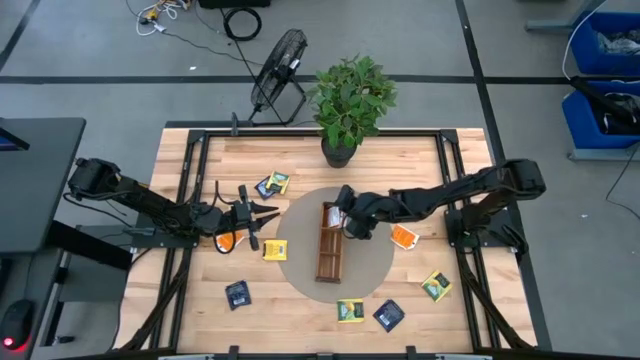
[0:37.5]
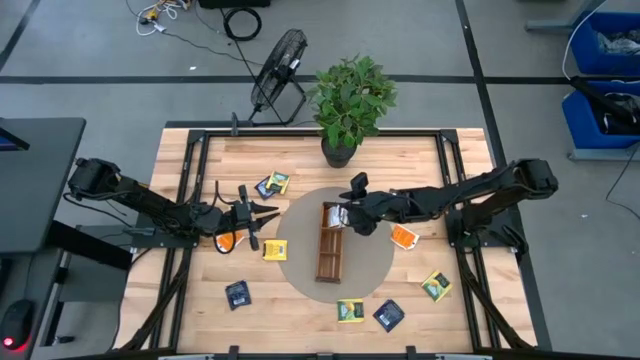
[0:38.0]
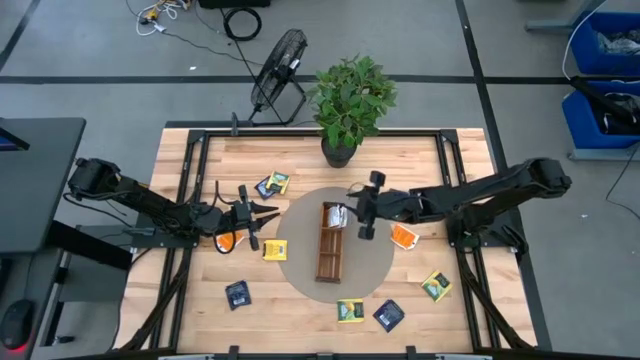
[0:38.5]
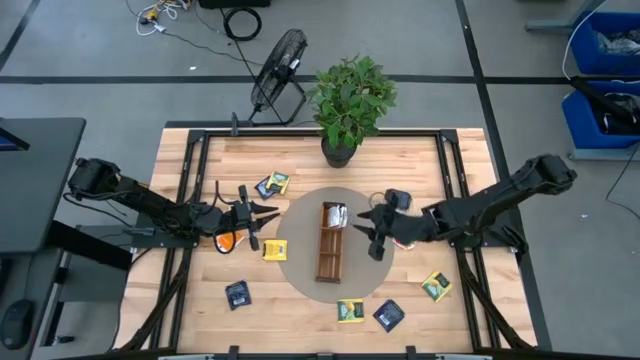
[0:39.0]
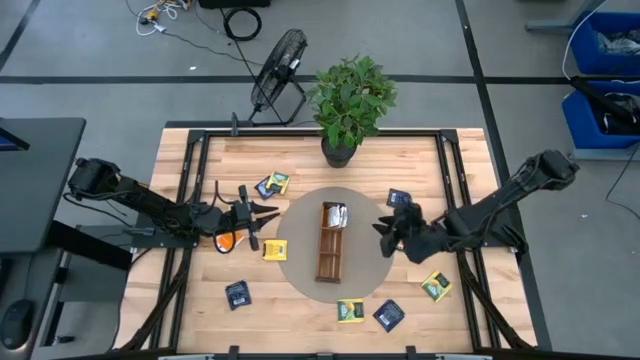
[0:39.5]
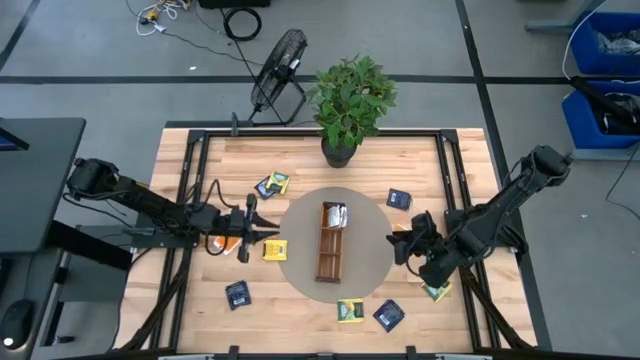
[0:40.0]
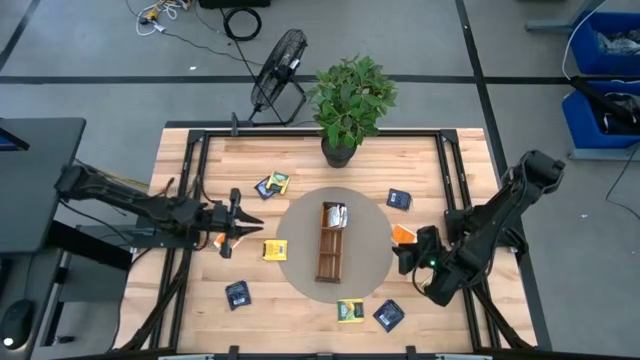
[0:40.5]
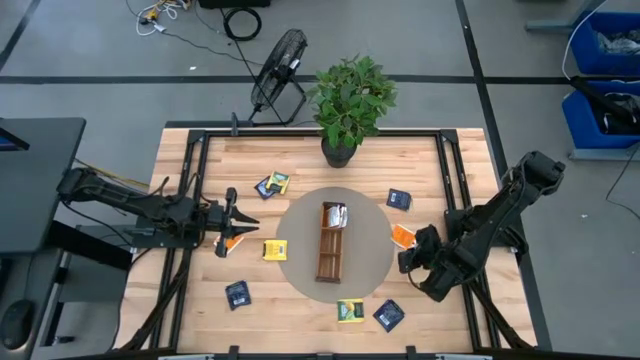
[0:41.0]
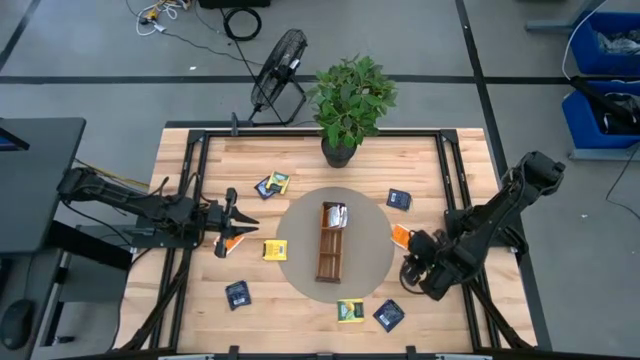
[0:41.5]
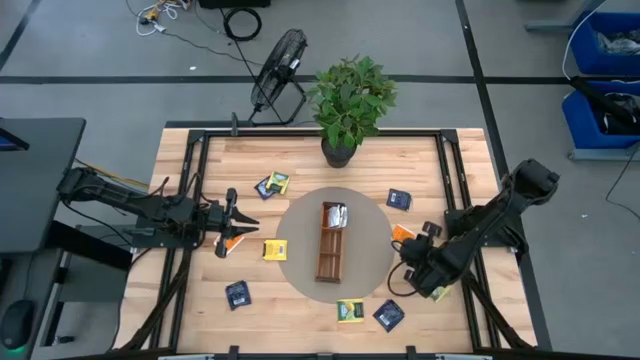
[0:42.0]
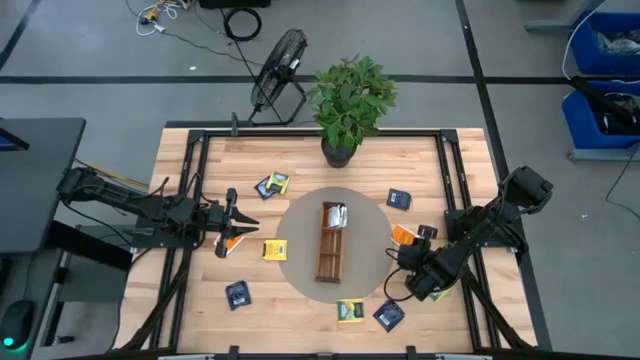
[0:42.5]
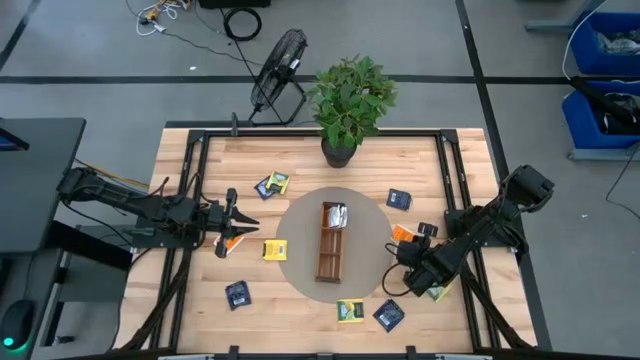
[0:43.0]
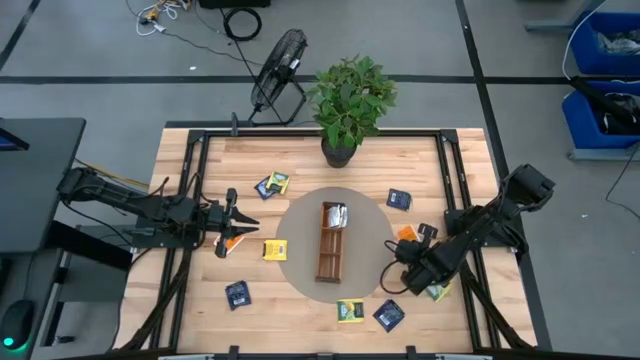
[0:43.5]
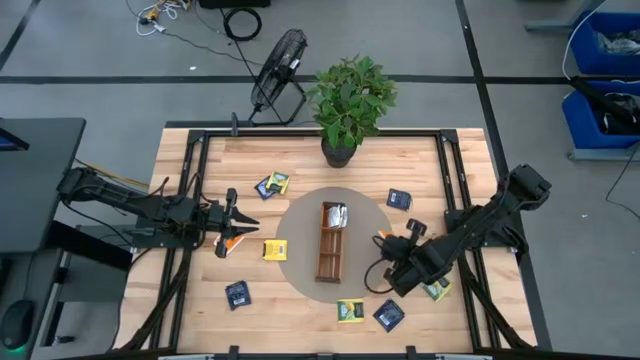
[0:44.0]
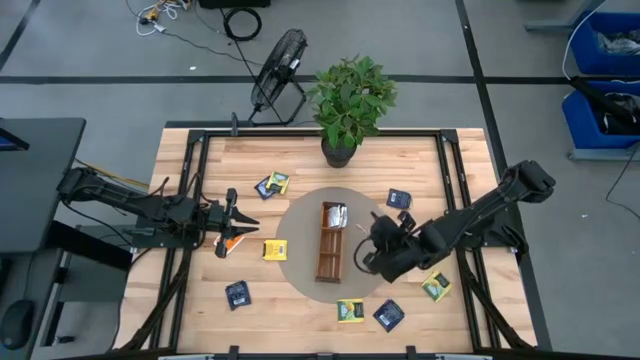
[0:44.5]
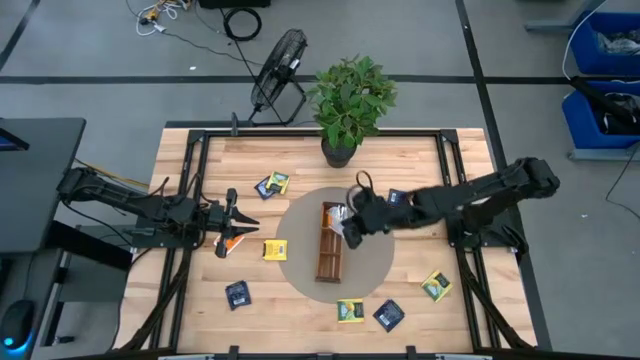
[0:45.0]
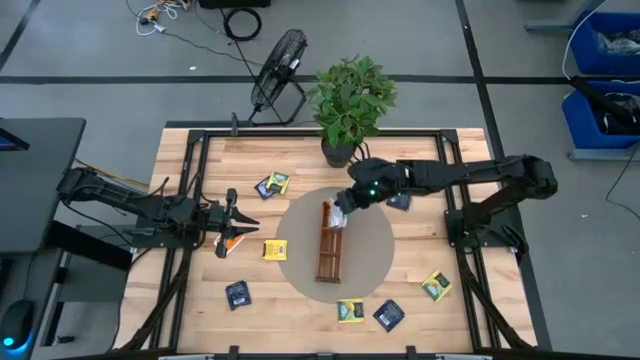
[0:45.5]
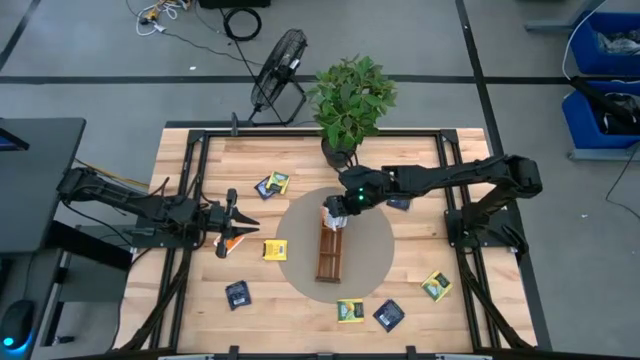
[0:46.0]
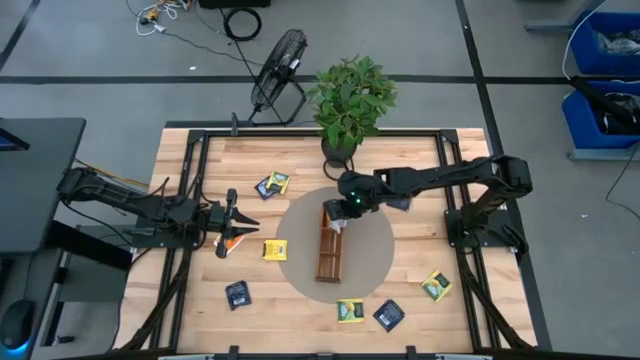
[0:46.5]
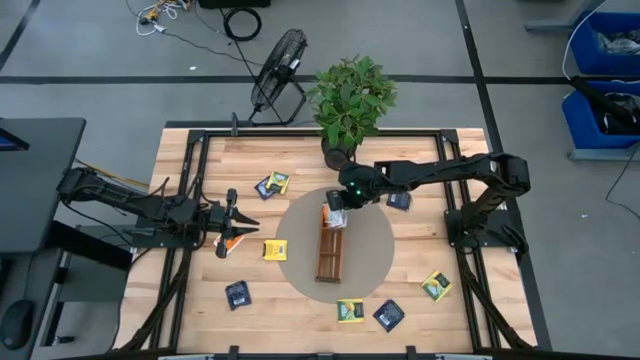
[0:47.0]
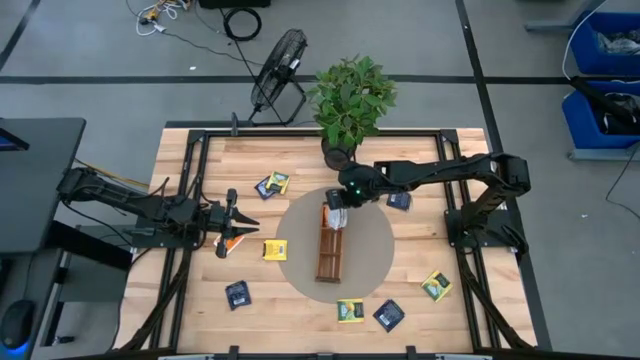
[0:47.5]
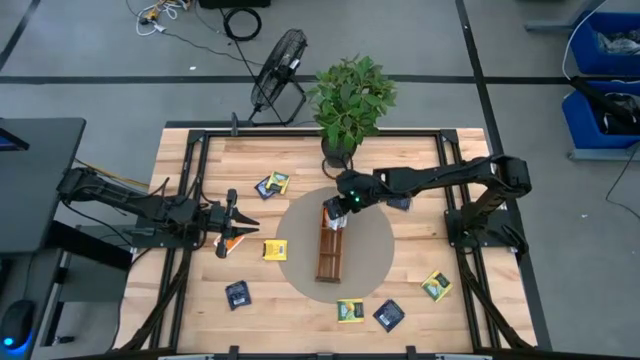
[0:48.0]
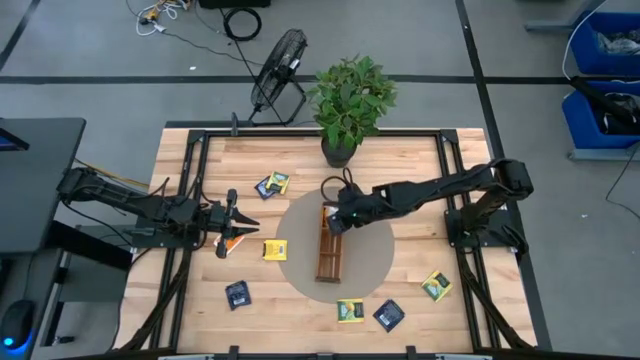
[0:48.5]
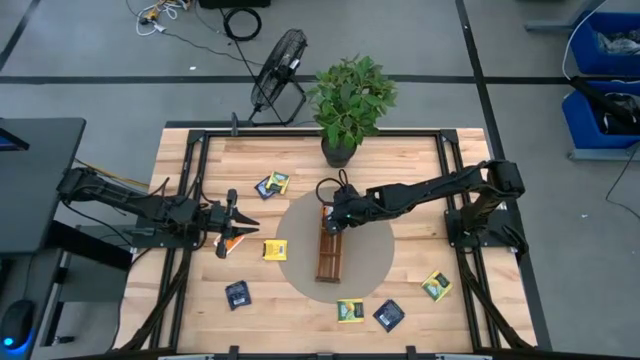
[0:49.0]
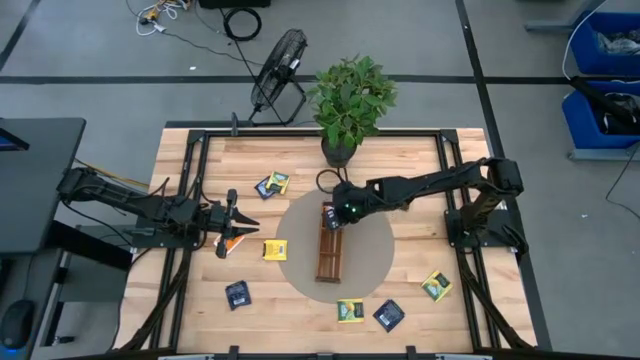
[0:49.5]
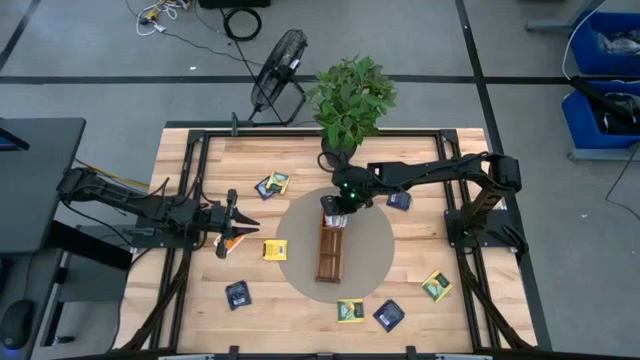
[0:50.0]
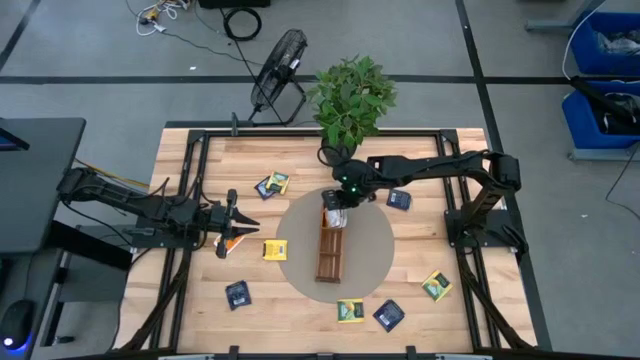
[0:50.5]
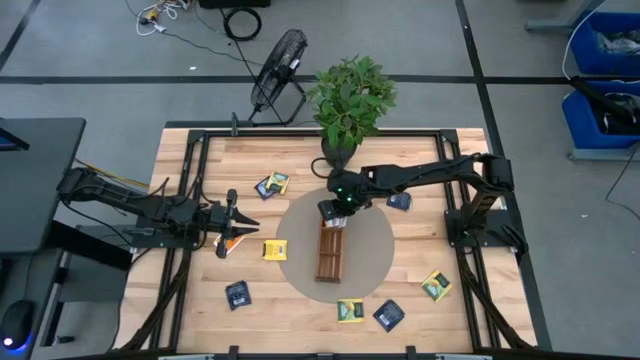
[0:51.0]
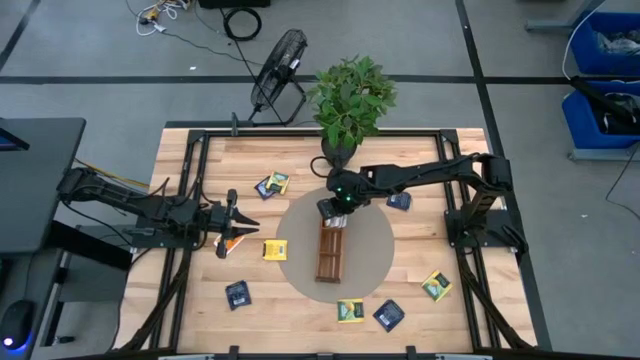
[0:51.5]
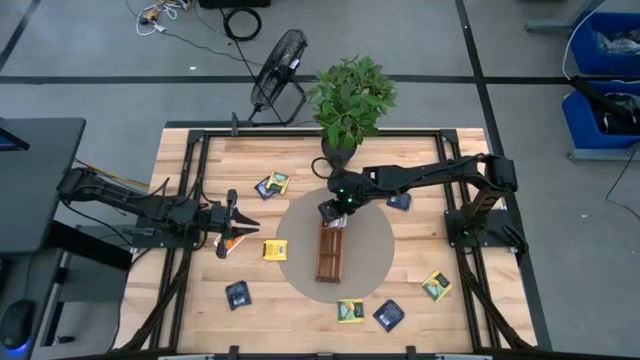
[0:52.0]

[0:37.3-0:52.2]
Task: Pick & Place Tea
Put the orange tea bag into the top compartment of the top section wooden organizer

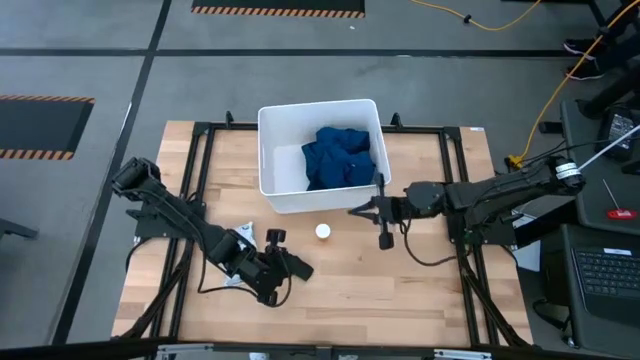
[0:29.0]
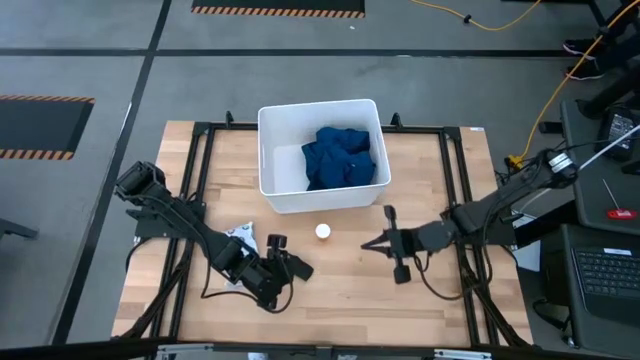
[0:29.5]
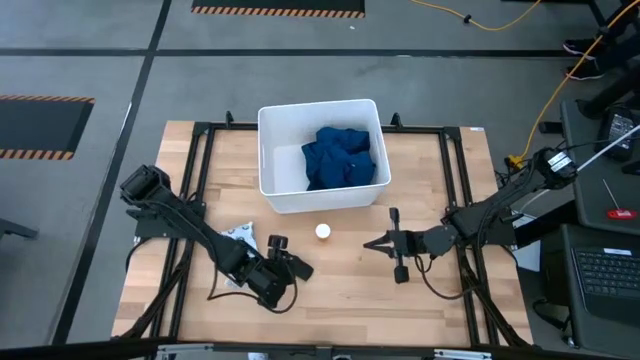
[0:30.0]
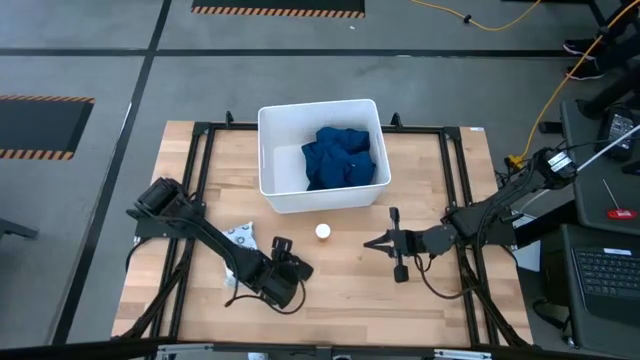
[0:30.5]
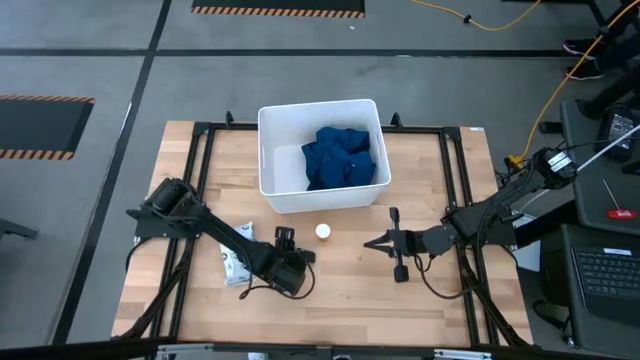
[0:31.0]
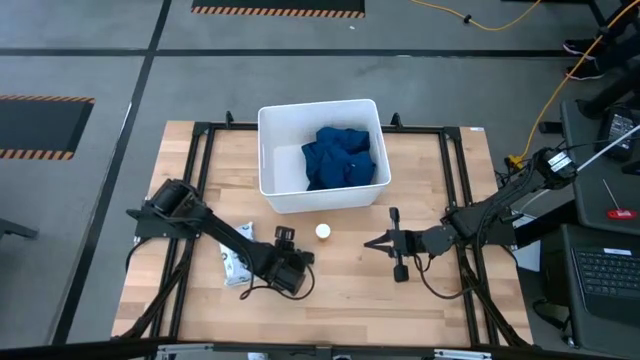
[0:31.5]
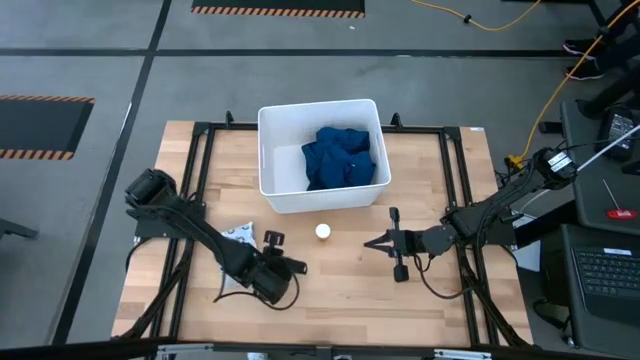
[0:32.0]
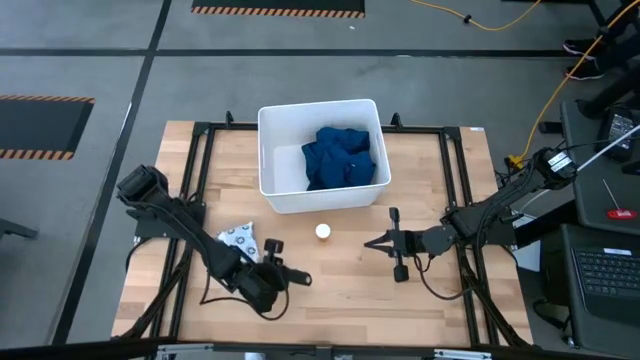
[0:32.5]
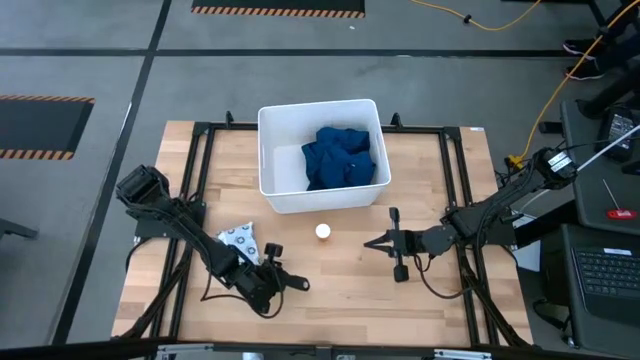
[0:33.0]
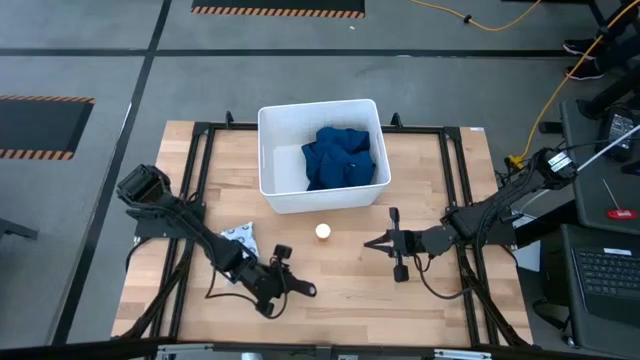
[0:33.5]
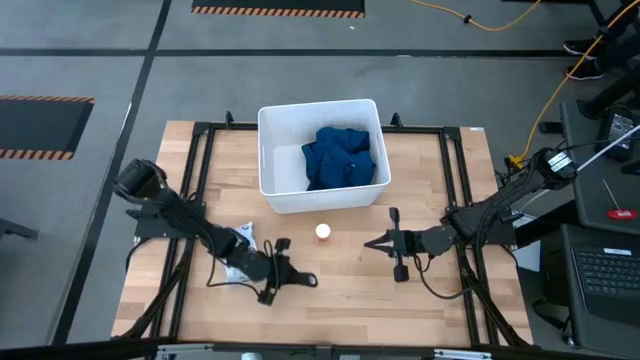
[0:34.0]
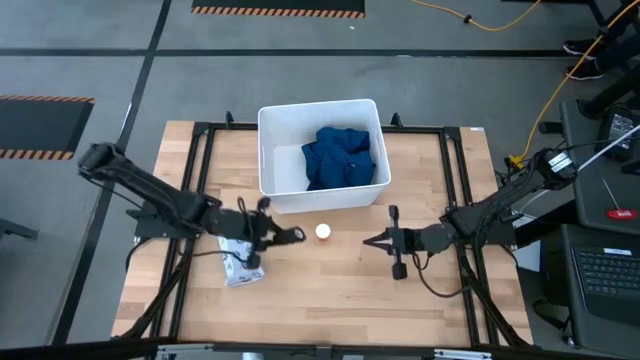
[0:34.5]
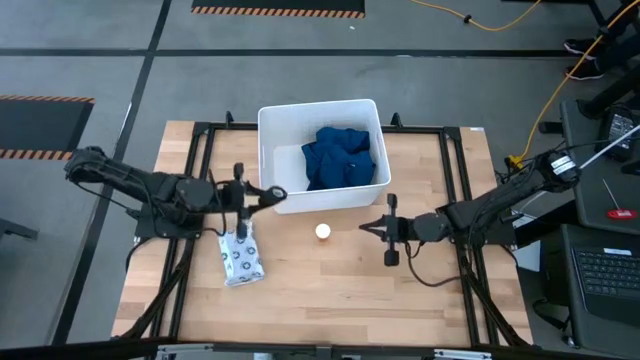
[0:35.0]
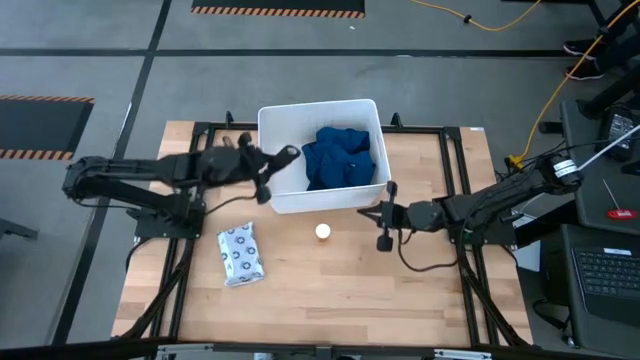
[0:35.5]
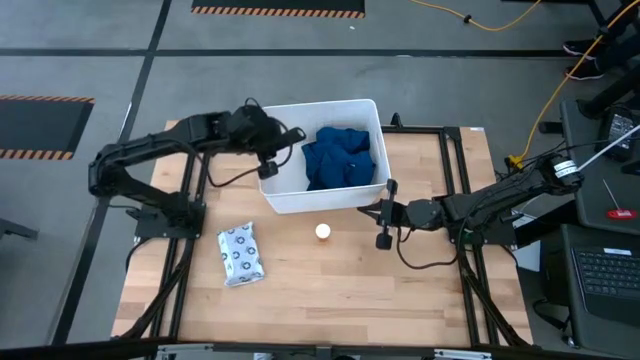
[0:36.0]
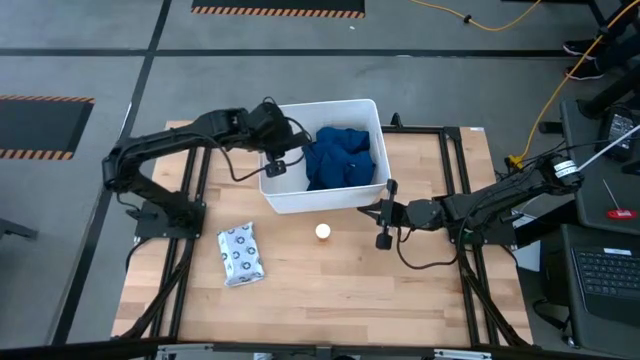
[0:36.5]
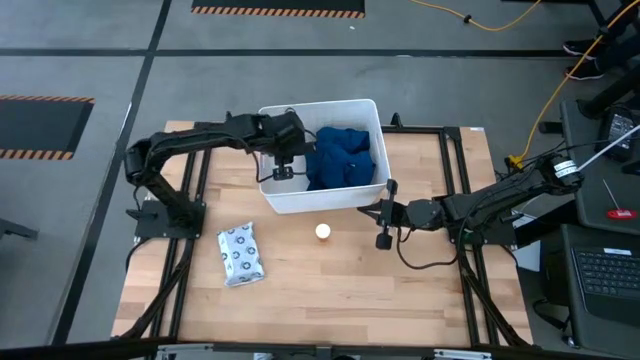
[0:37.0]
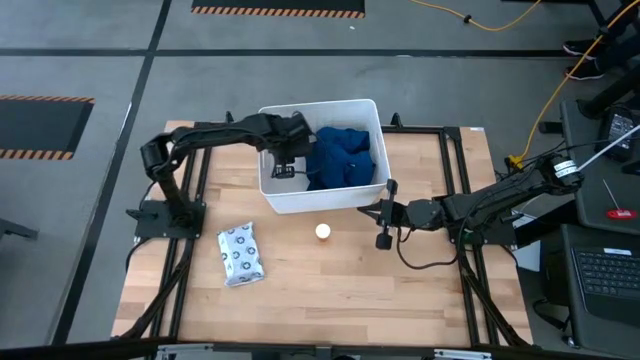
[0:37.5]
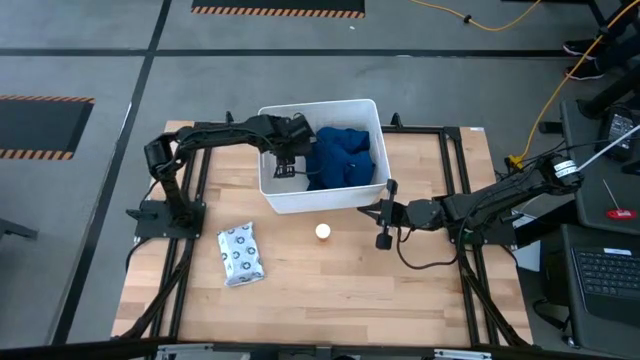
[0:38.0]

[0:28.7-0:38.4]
Task: Pick & place medical supplies in basket/bin
Put the black bandage into the white bin
